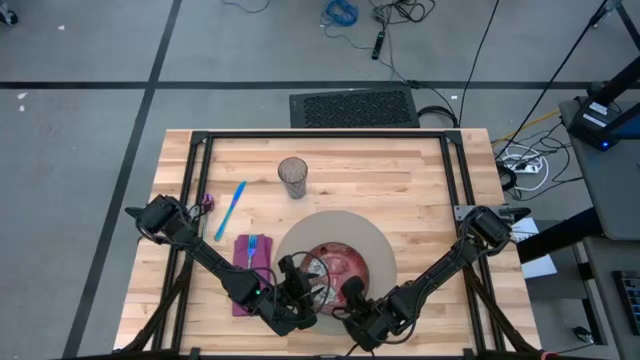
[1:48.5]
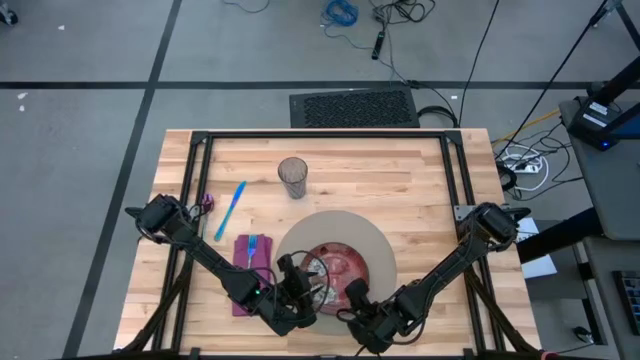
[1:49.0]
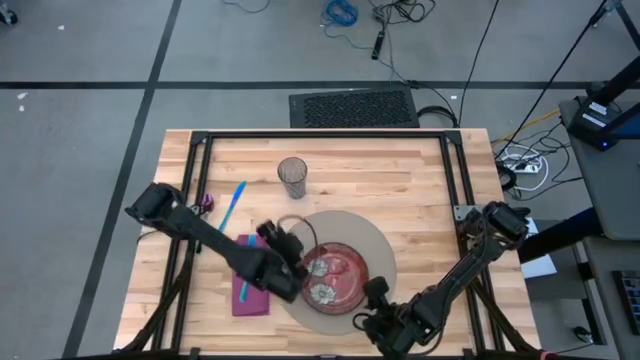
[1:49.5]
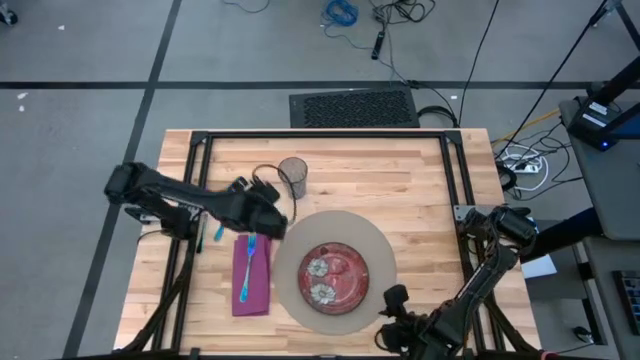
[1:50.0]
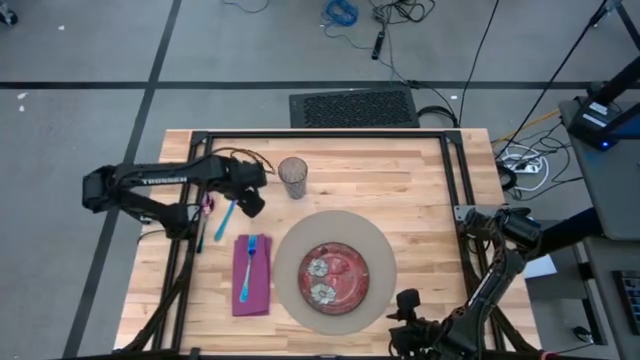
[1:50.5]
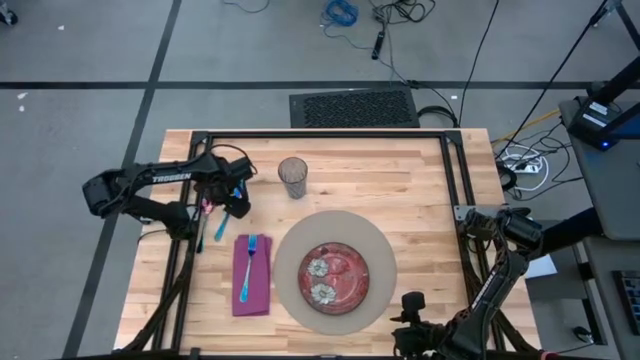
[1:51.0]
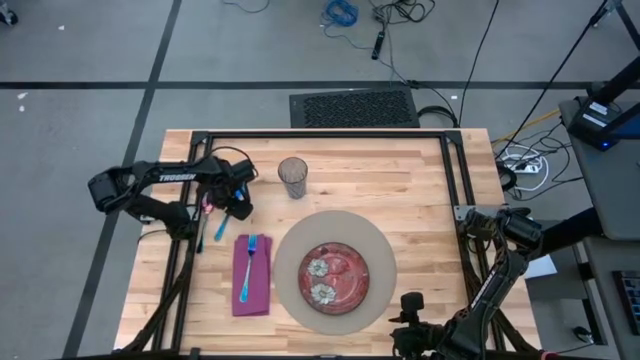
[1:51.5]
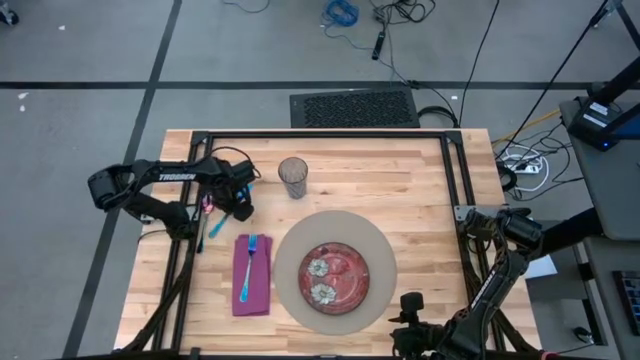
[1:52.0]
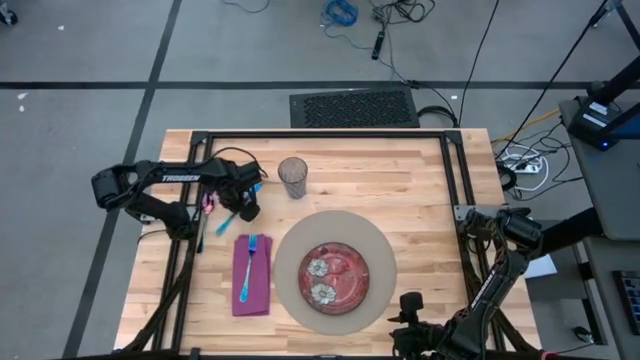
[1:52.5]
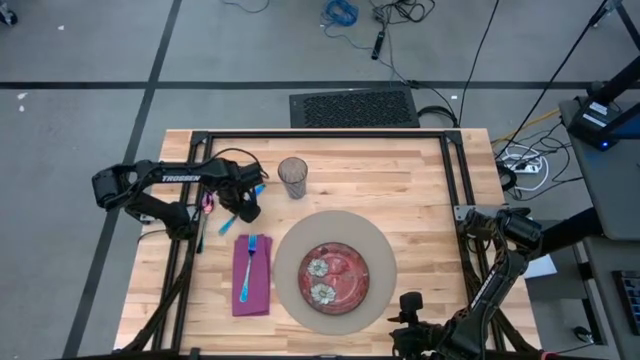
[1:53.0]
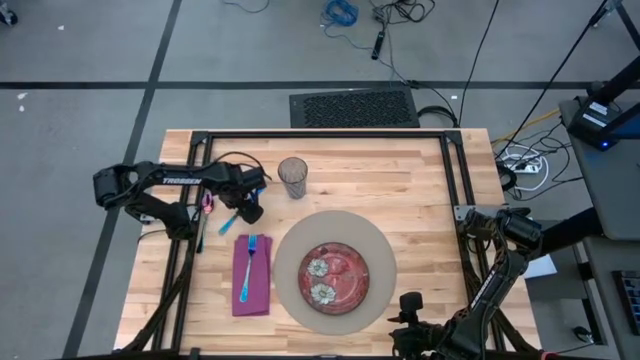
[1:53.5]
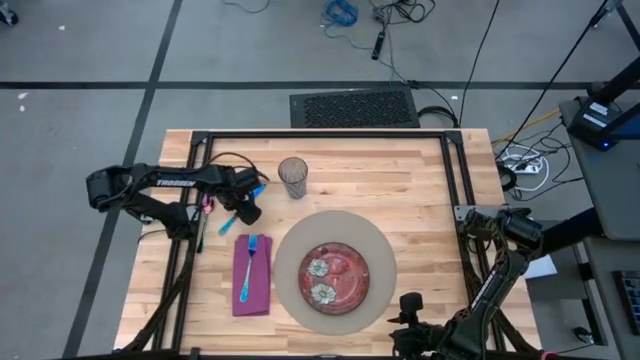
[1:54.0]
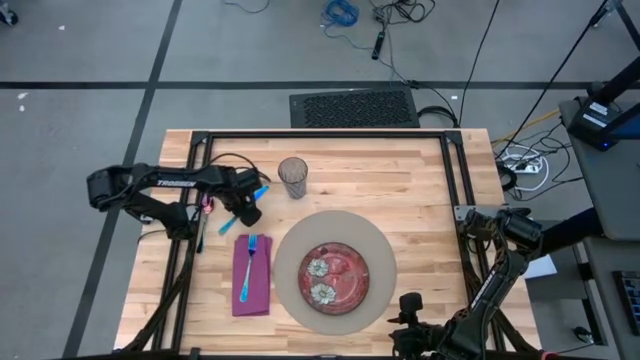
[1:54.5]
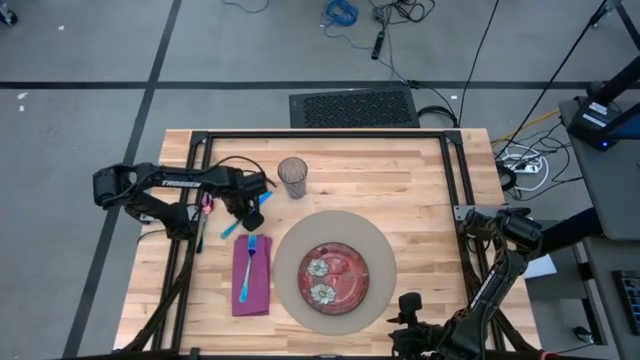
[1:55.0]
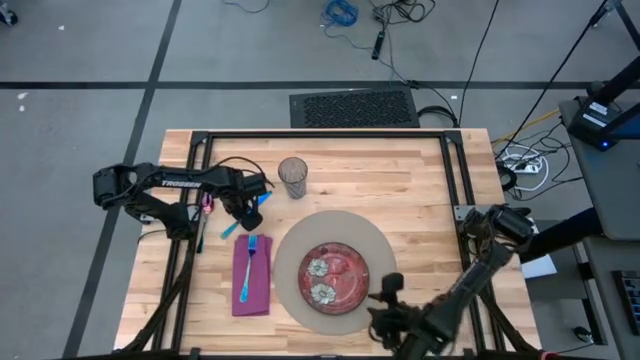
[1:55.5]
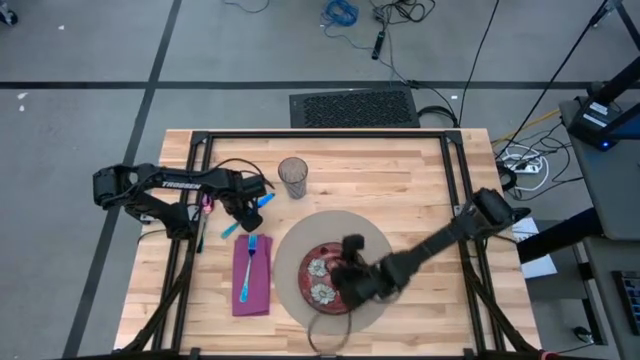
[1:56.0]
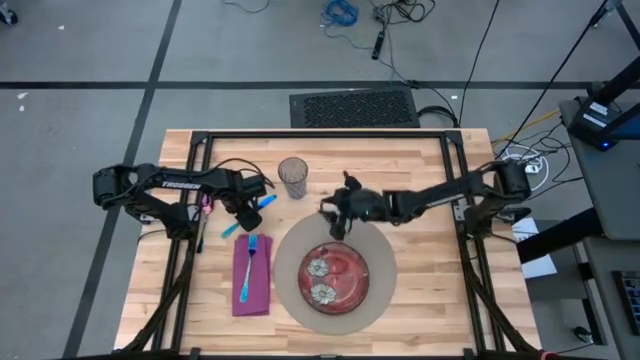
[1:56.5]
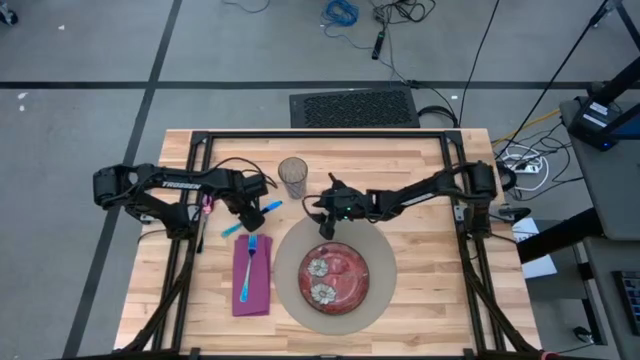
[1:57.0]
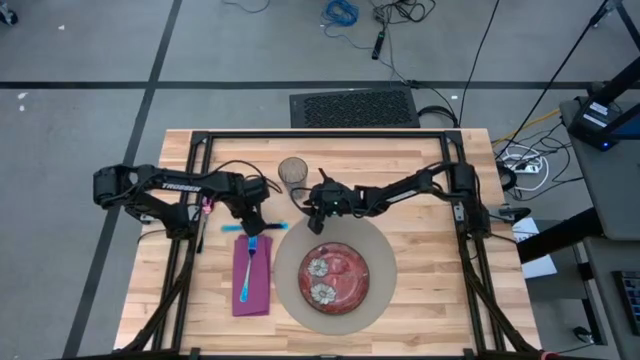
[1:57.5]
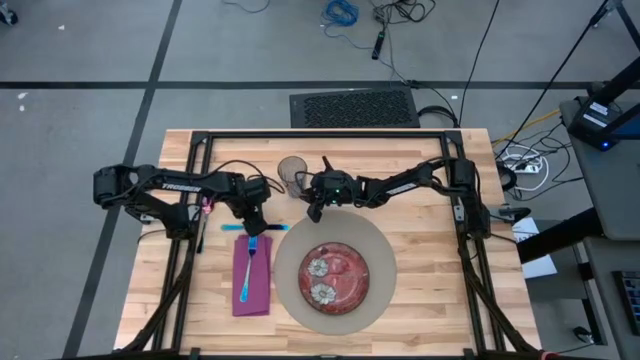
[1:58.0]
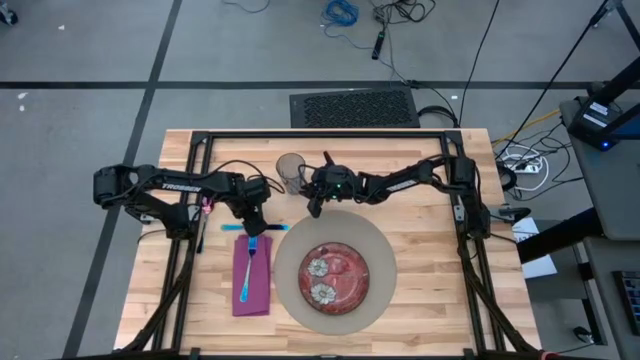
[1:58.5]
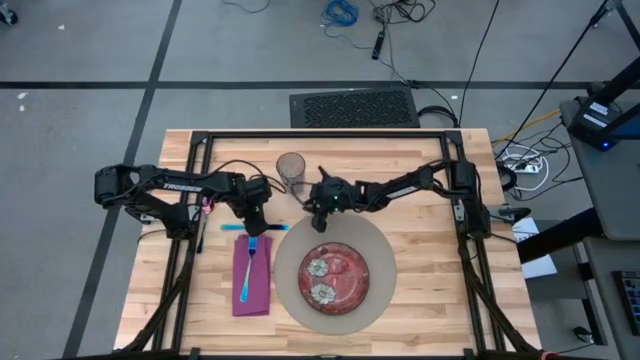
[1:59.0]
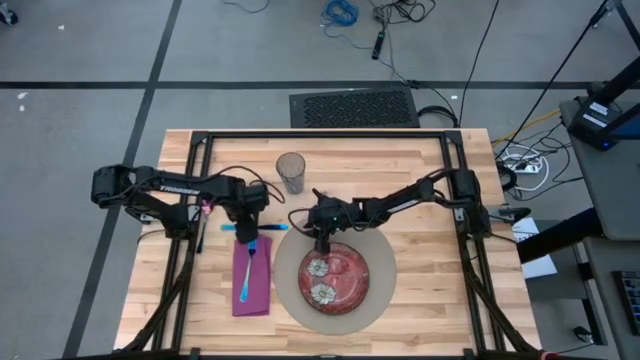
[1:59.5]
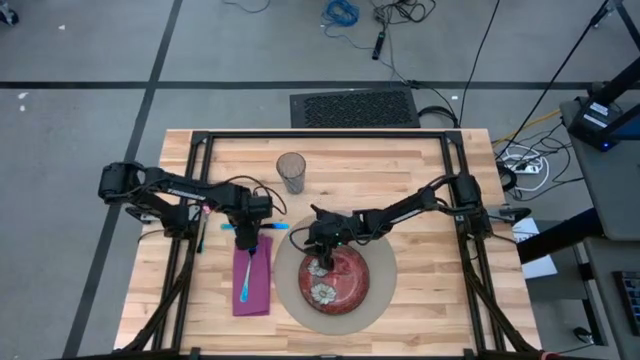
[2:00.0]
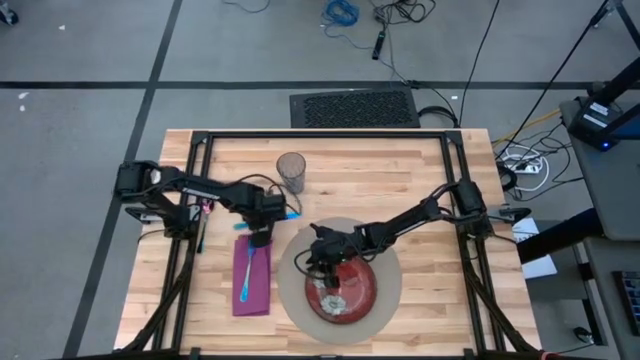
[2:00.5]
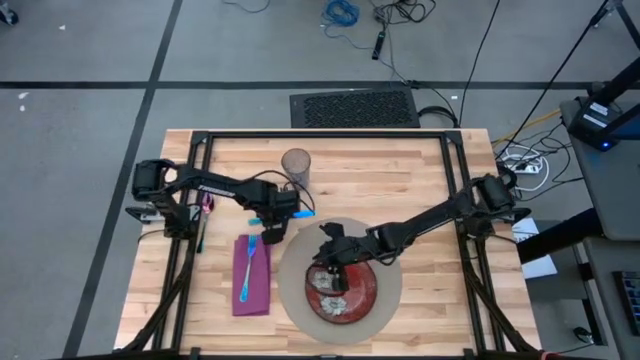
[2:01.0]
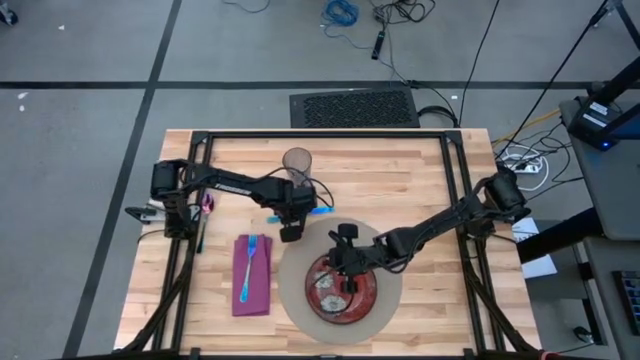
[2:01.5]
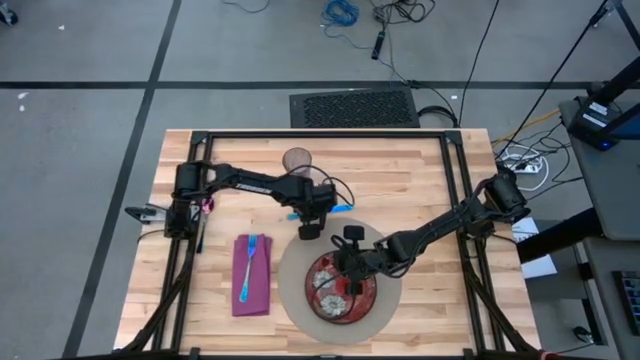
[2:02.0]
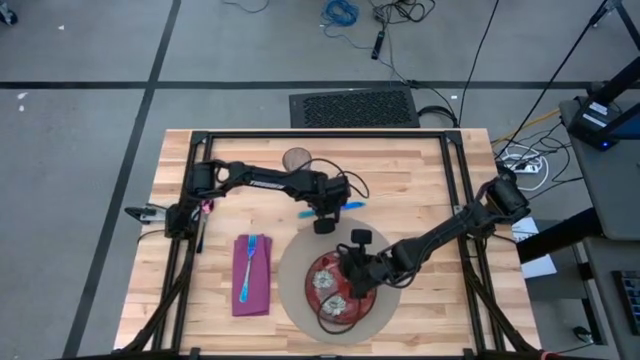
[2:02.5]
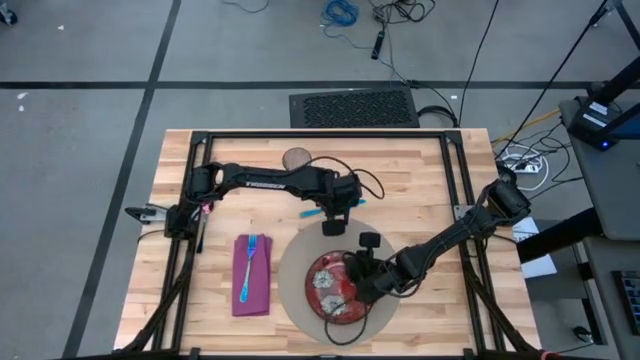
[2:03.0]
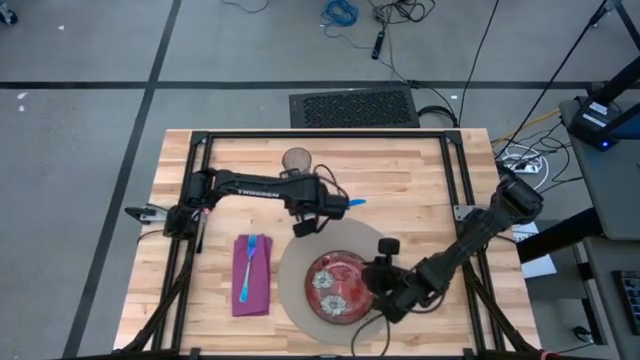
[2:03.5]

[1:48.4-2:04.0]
Task: Set table place
Move the blue table knife to the right side of the gray placemat

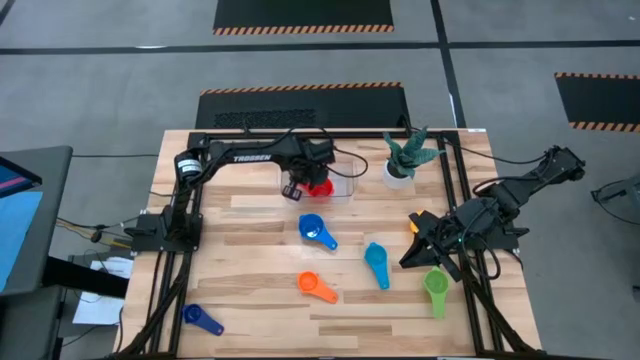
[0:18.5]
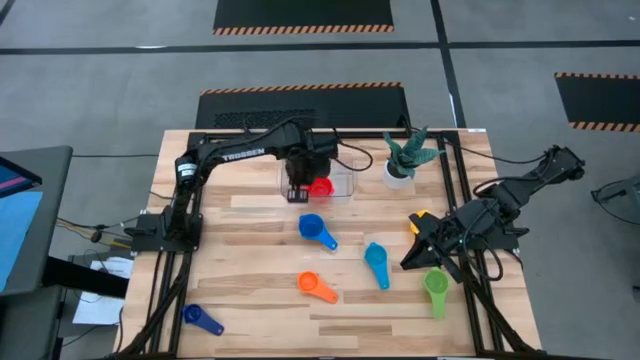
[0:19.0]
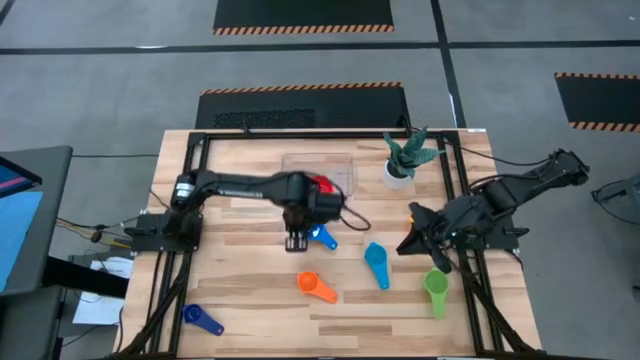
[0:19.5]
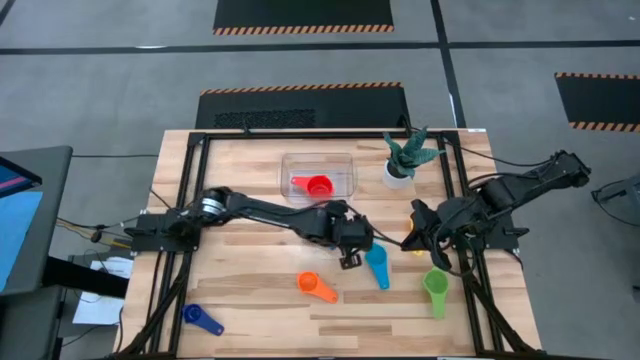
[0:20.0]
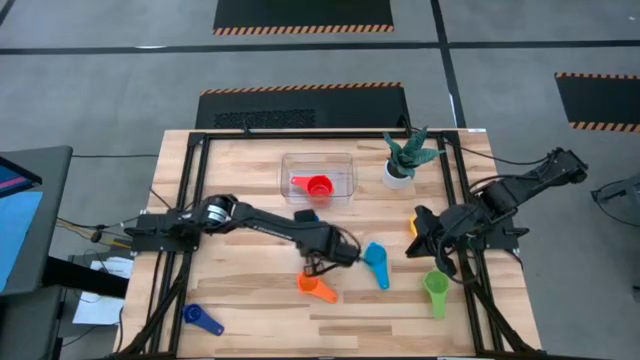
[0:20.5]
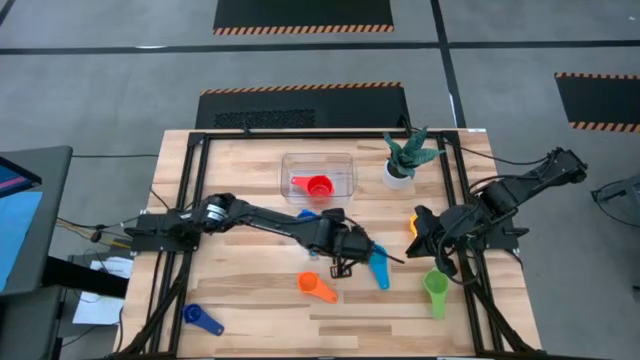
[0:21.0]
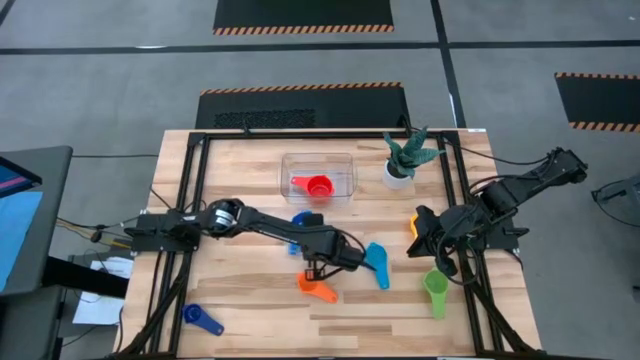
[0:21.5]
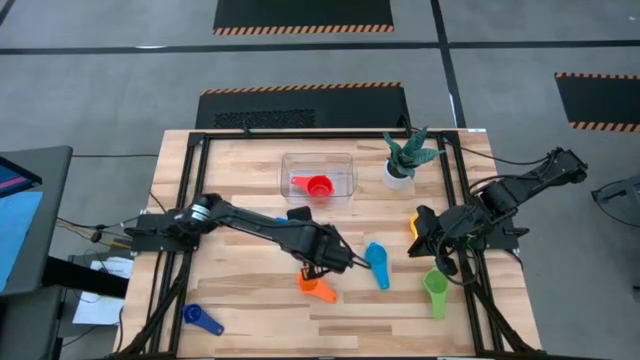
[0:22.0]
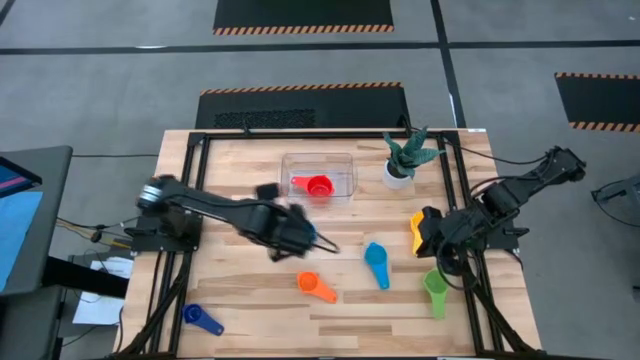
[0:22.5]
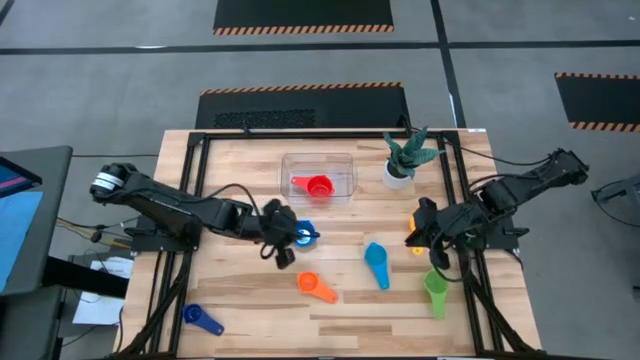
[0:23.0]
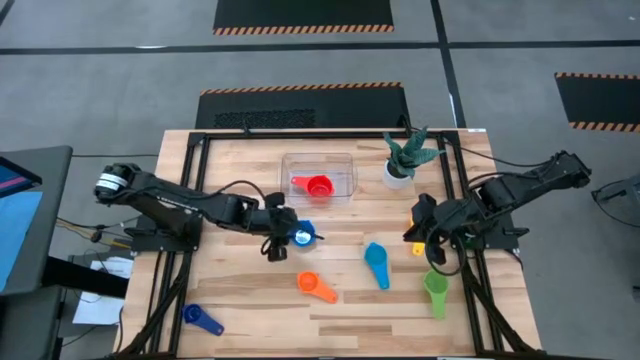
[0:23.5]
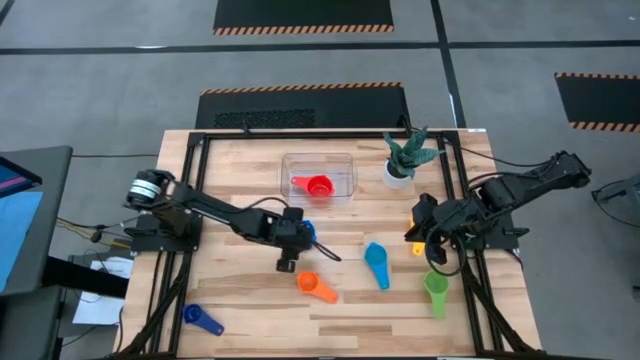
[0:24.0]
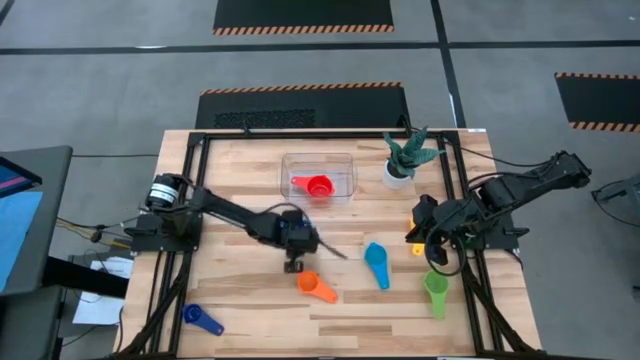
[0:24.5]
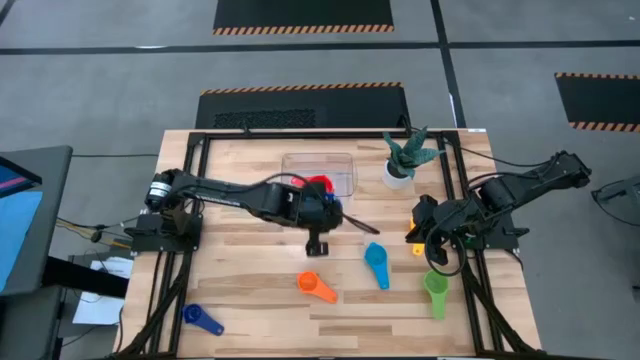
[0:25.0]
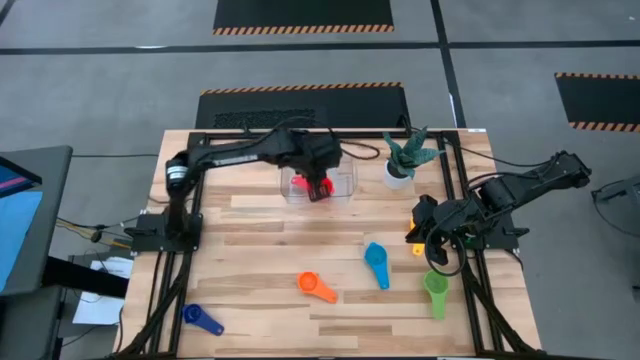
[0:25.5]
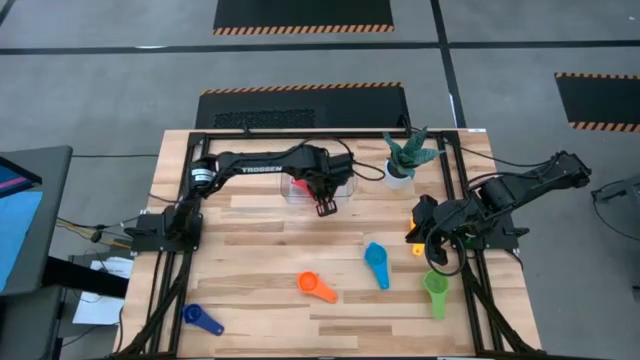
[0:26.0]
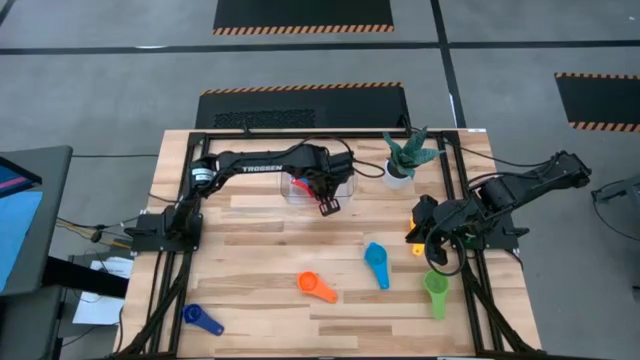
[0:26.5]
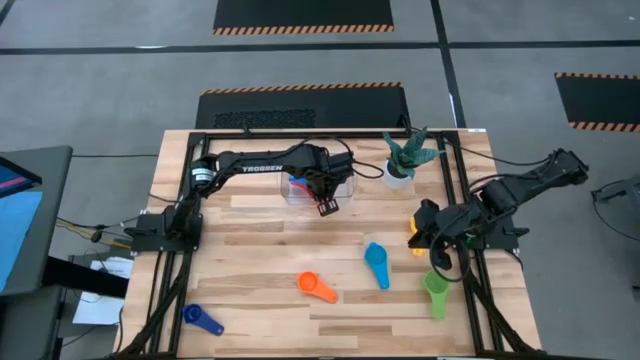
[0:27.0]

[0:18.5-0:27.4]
Task: Nest measuring cups in basket
Stack the blue measuring cup on top of the red measuring cup in the transparent bin
